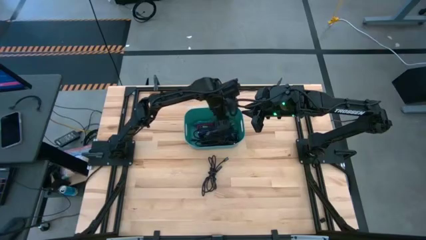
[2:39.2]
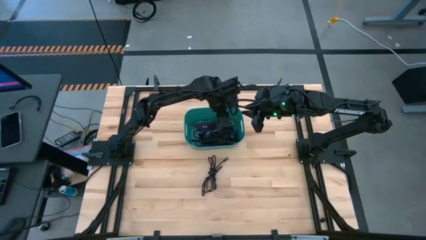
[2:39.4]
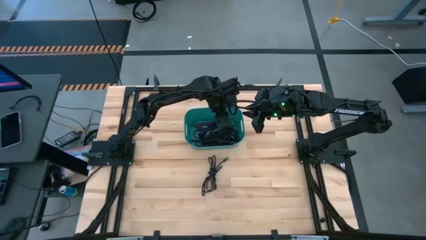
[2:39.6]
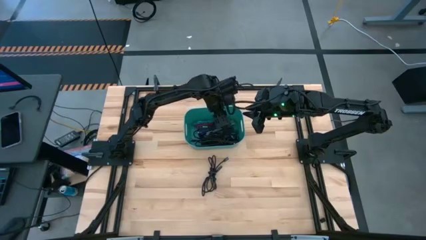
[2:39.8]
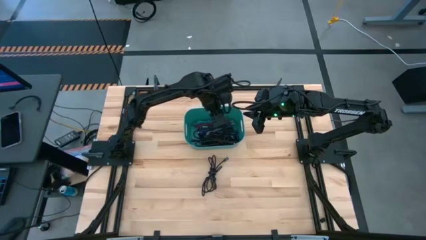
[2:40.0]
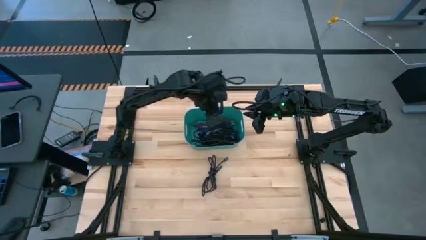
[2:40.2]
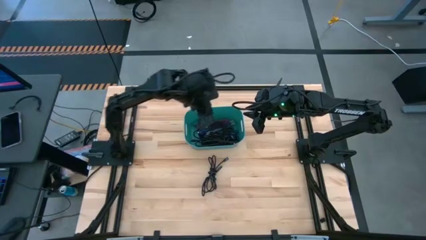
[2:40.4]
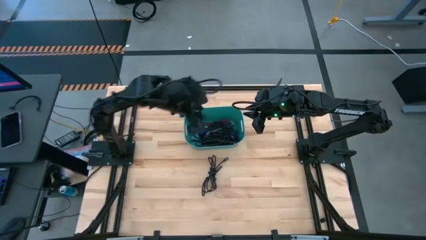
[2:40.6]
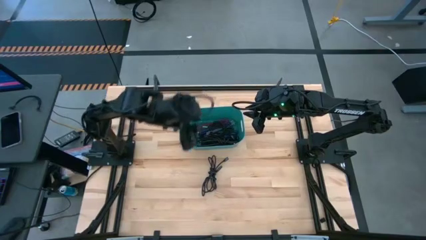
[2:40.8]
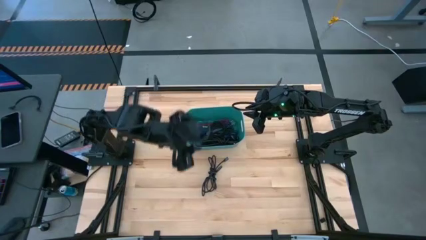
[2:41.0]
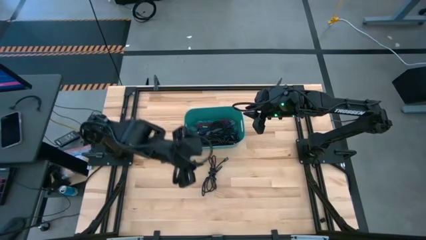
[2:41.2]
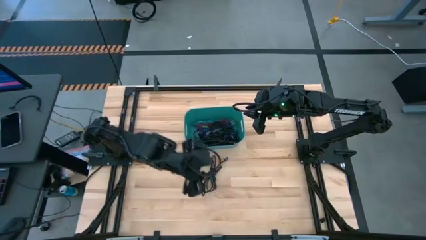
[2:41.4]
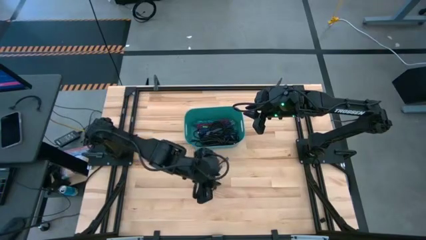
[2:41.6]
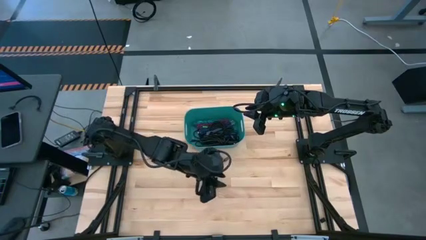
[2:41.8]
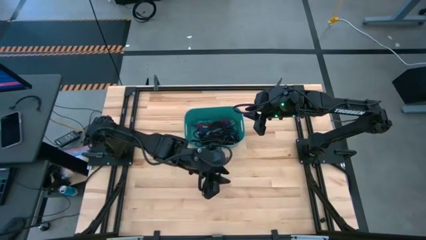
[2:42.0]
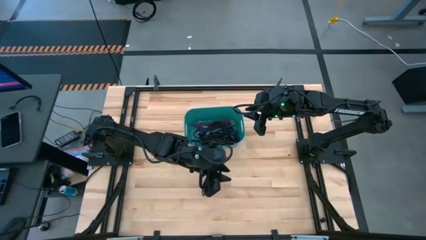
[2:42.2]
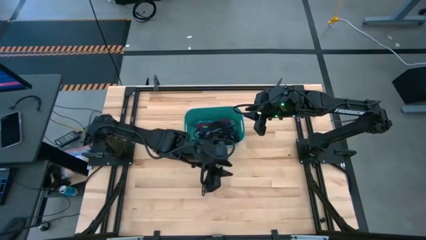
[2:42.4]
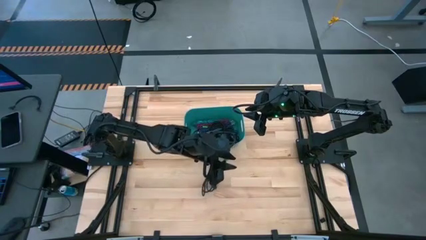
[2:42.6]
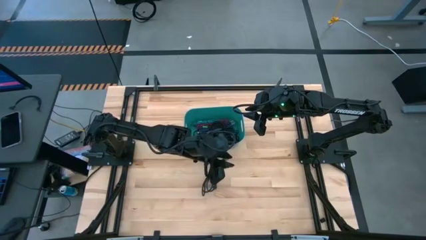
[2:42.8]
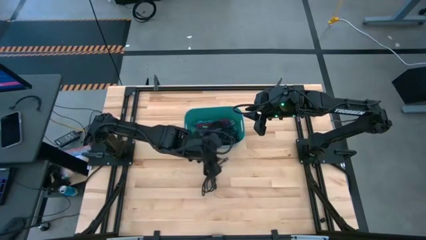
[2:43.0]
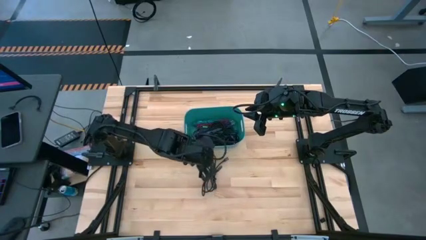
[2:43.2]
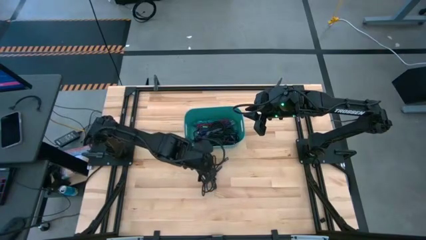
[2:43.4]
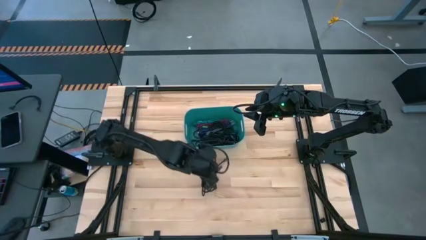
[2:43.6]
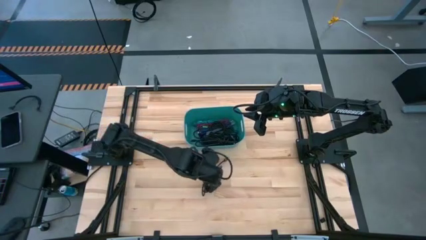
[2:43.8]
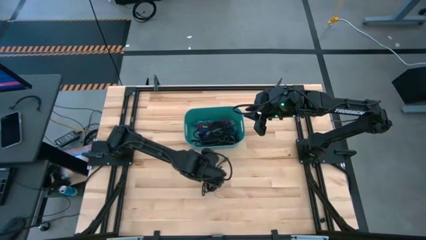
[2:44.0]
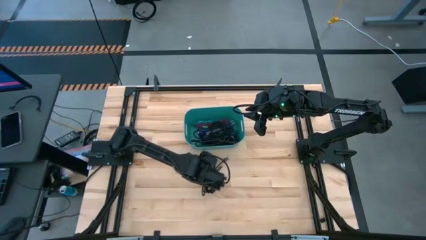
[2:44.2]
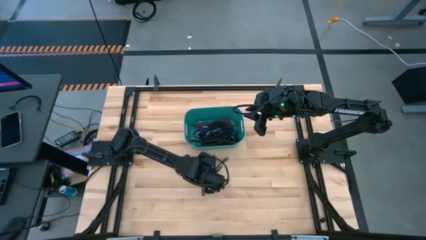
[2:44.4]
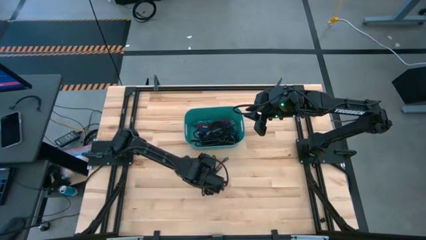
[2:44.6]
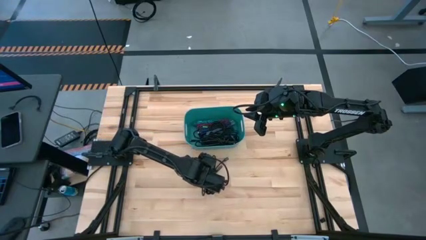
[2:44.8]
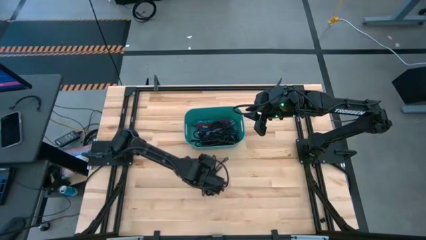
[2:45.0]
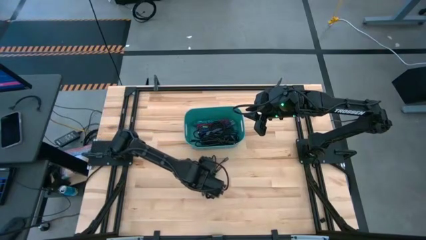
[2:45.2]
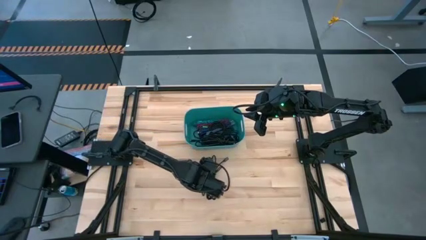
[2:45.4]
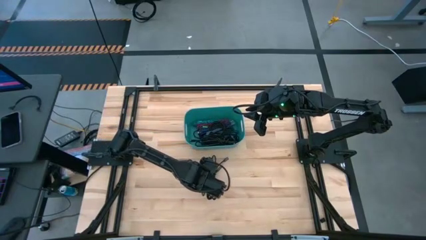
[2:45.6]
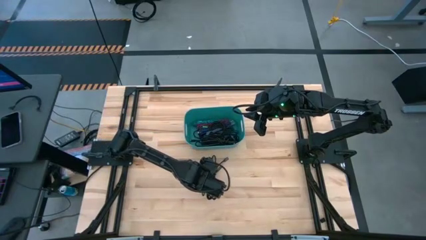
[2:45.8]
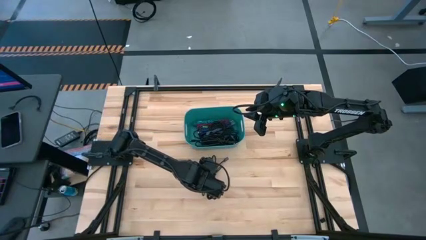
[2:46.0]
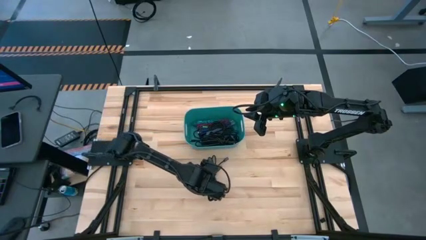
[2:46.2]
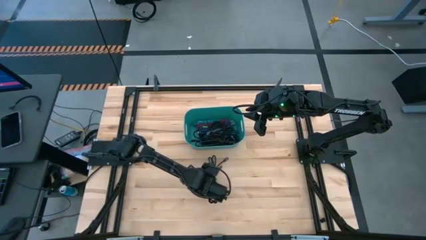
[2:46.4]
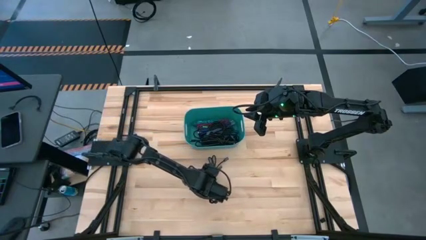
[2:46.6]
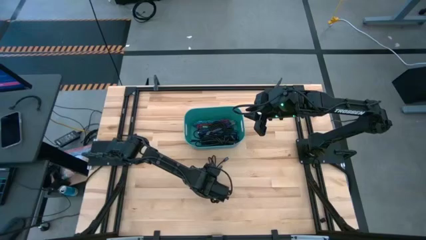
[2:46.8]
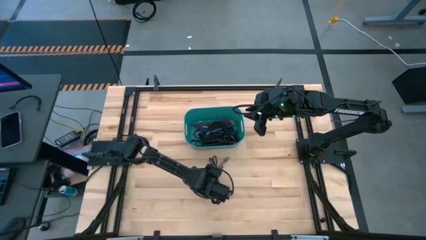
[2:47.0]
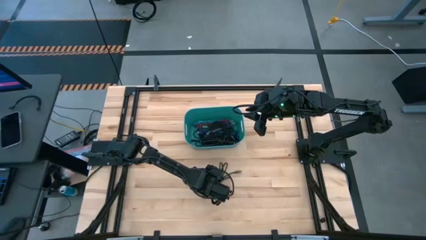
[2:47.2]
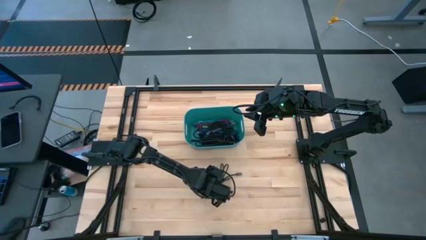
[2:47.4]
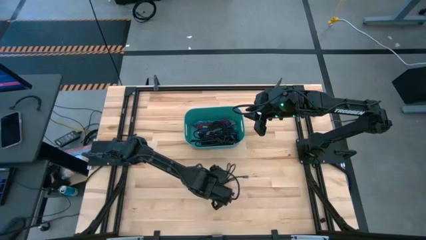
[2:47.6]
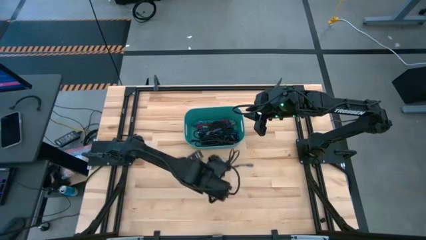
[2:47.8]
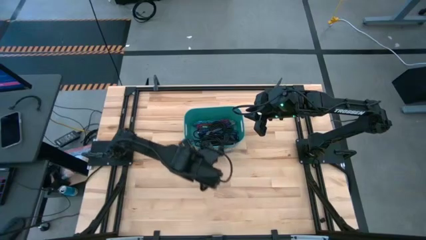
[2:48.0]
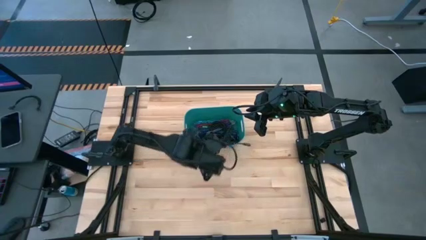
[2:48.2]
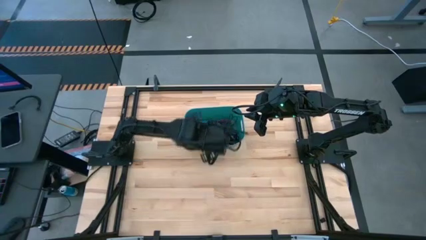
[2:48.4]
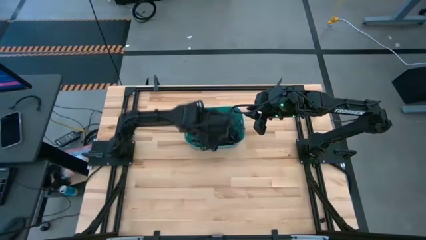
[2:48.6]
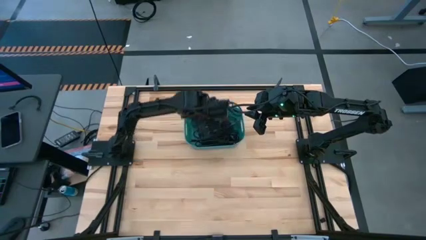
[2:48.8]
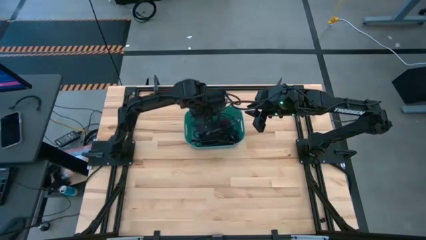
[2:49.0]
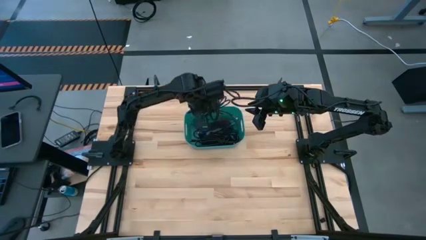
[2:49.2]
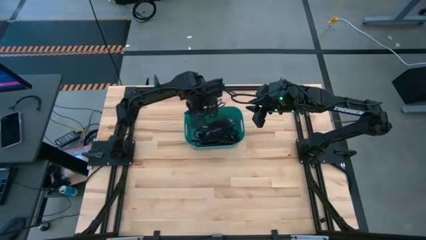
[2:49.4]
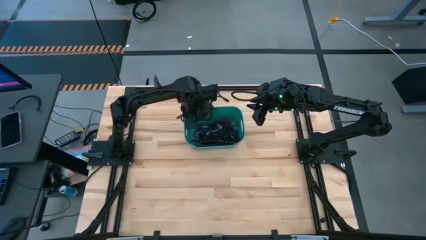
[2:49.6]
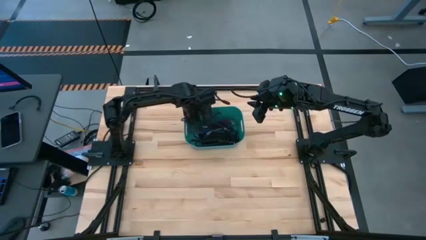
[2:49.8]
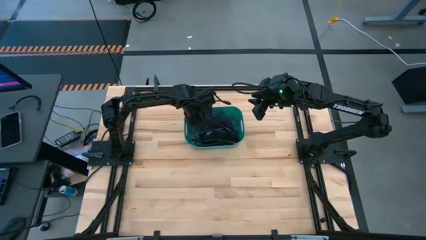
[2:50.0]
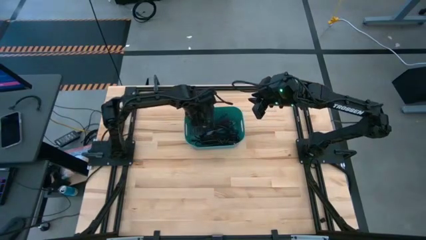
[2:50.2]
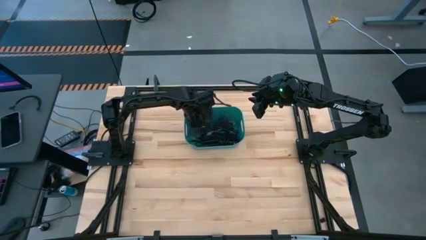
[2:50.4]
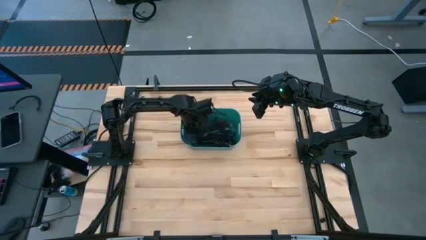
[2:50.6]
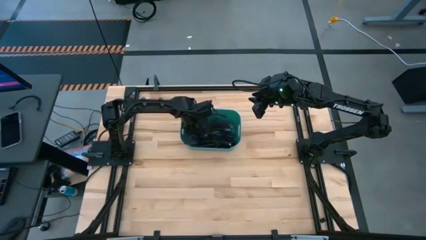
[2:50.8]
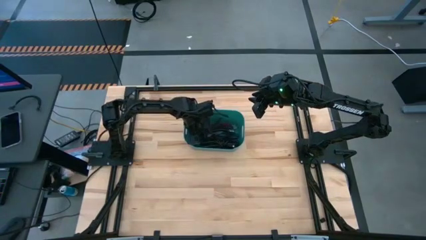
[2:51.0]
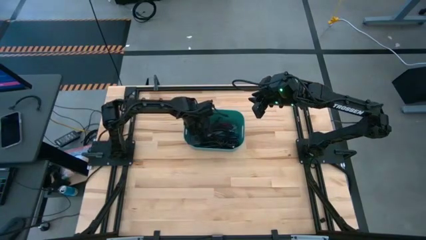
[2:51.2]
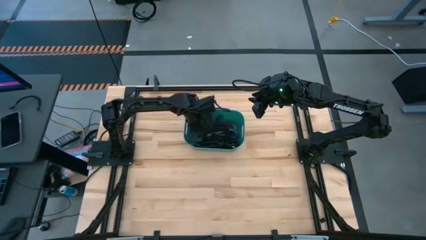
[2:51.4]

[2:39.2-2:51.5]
Task: Pick and place USB-C Cables
Put the black charger cable into the light blue bin

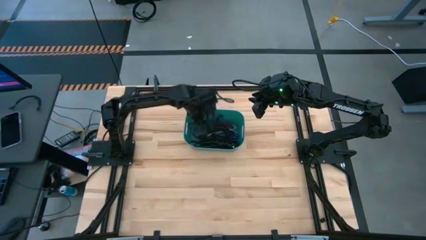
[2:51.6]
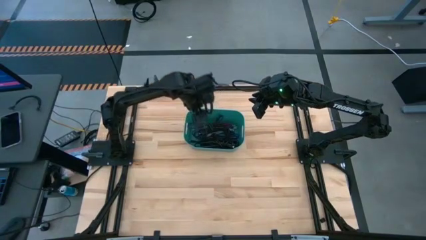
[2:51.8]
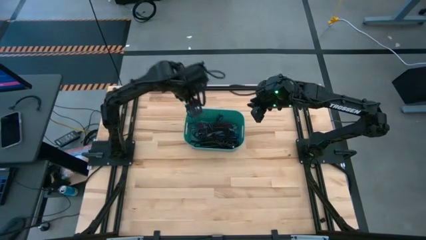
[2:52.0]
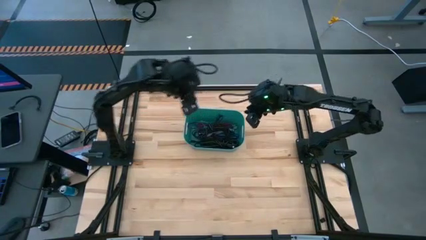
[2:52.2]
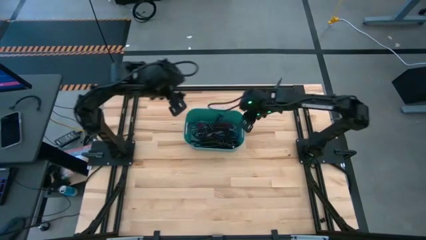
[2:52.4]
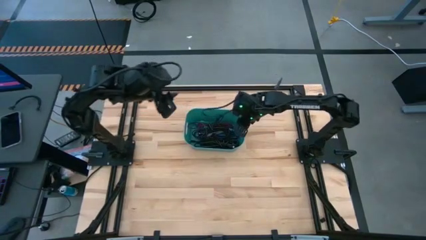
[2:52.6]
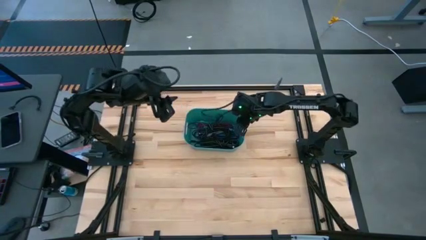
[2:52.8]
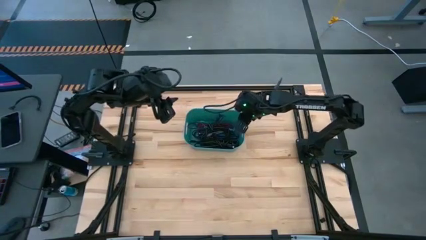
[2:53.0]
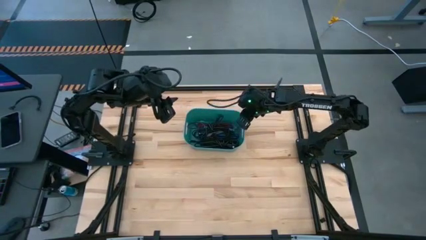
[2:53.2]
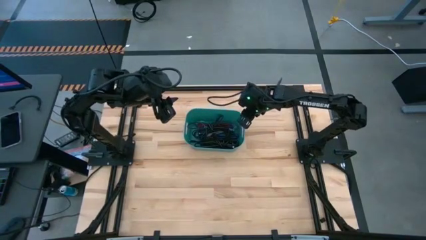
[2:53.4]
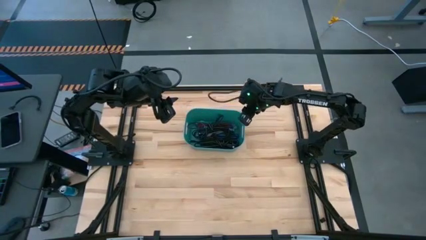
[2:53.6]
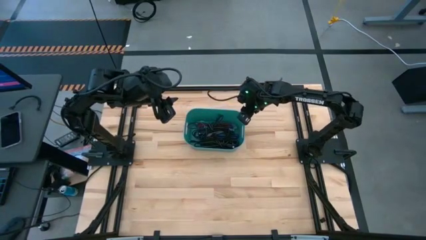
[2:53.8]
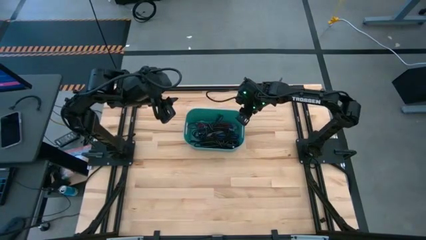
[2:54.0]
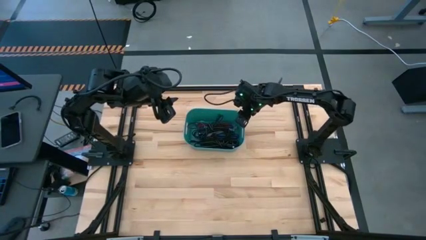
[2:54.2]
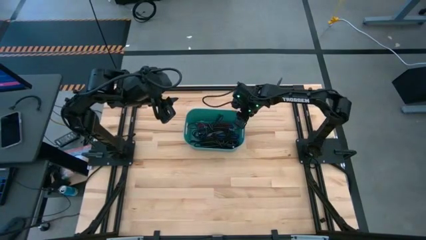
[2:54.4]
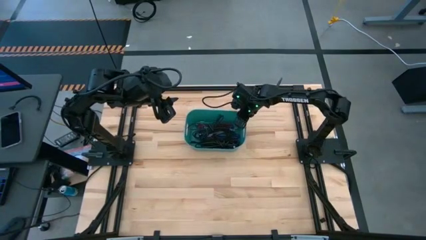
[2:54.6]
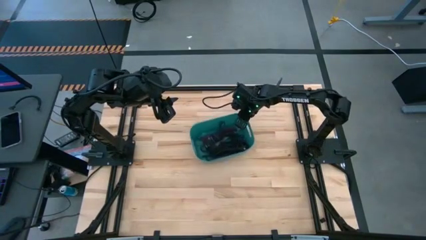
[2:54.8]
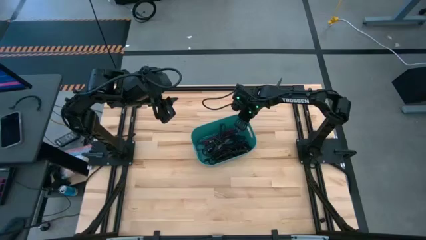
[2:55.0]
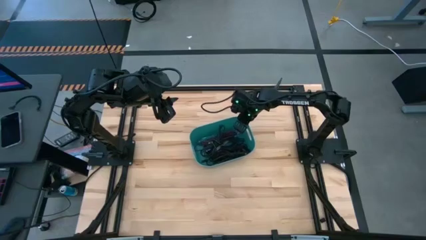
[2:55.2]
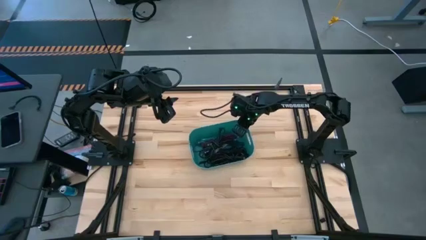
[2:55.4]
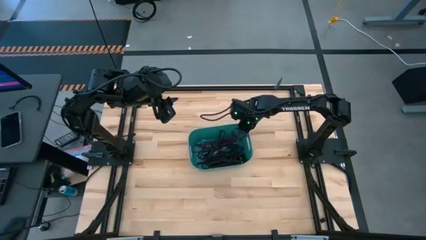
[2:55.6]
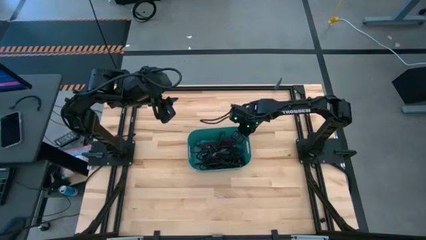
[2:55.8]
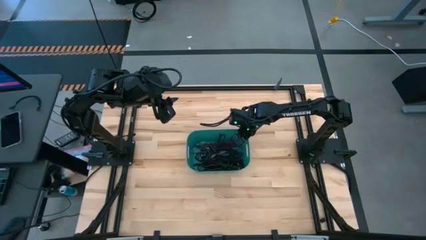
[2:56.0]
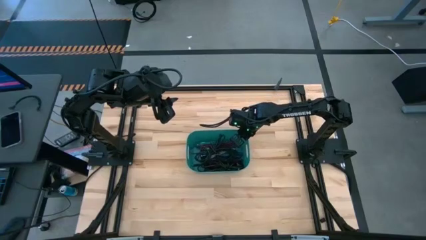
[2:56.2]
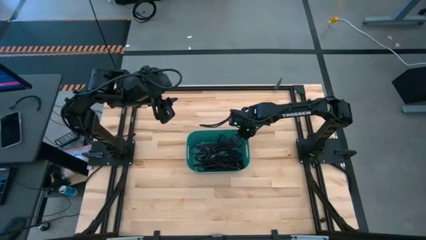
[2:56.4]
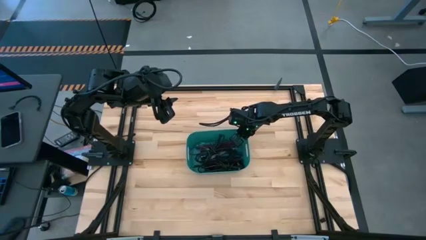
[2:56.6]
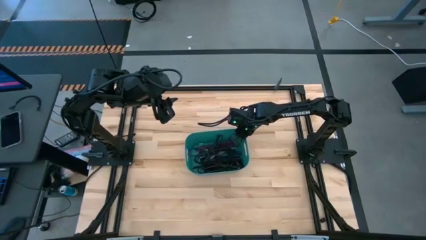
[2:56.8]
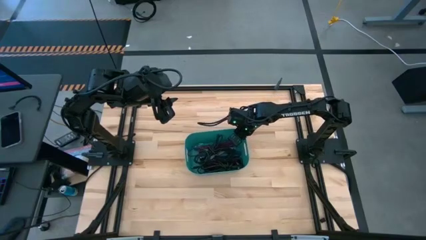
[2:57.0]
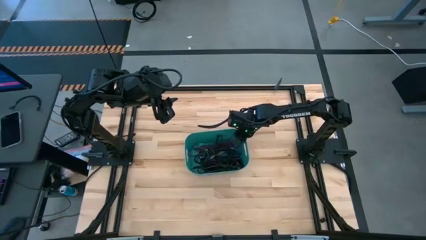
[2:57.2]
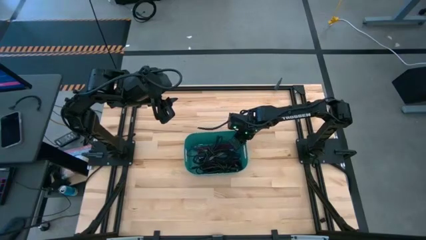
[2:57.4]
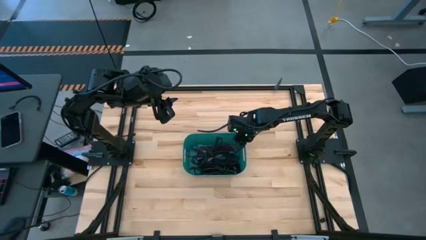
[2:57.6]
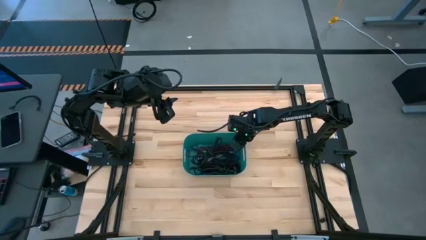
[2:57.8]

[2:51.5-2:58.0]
Move the light blue bin to the center of the table
